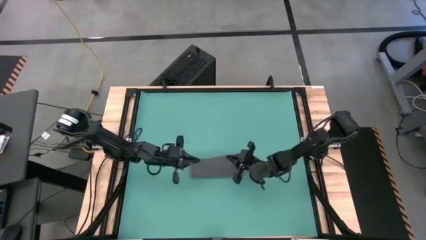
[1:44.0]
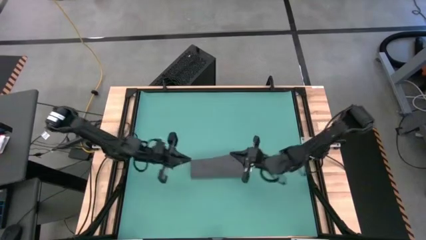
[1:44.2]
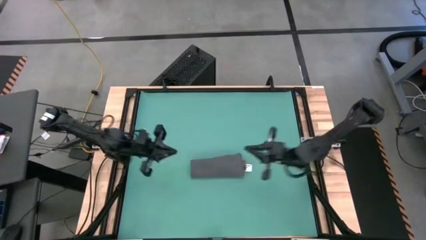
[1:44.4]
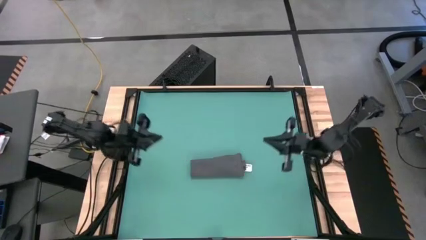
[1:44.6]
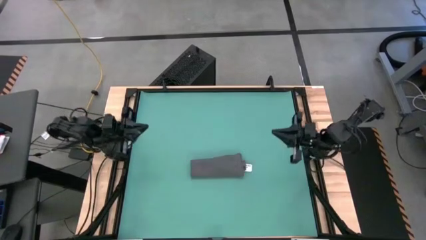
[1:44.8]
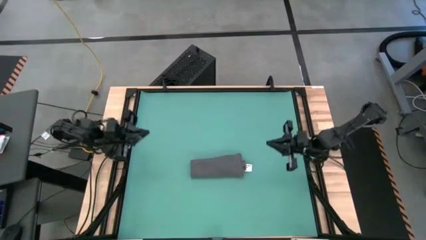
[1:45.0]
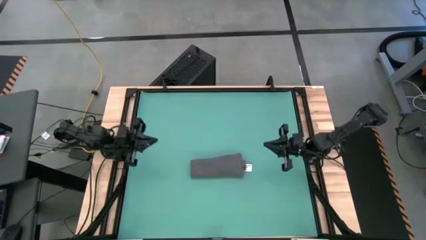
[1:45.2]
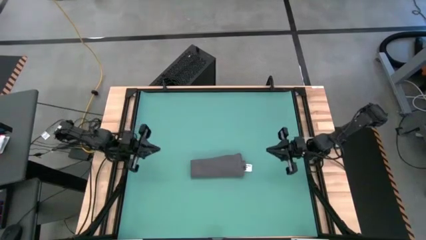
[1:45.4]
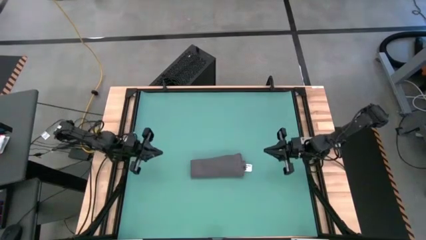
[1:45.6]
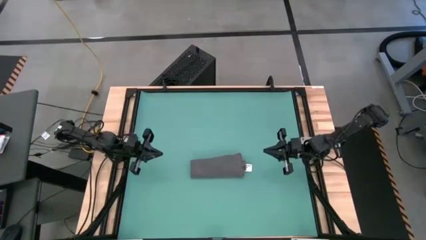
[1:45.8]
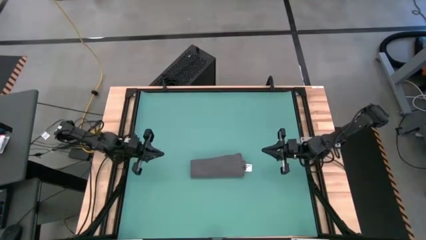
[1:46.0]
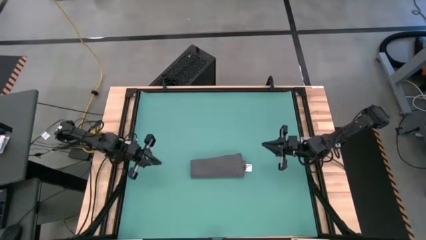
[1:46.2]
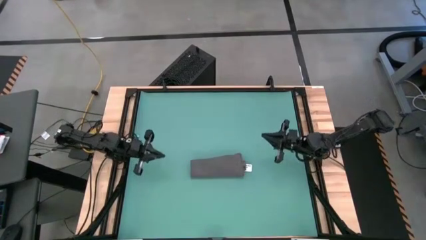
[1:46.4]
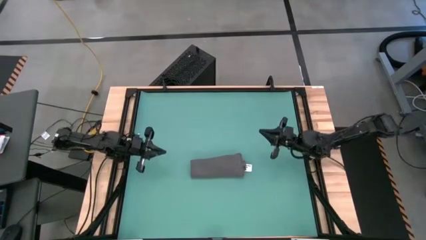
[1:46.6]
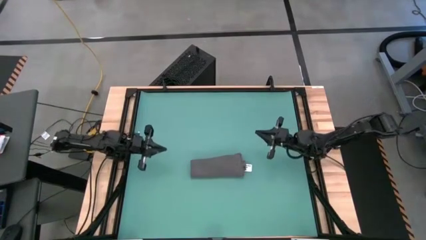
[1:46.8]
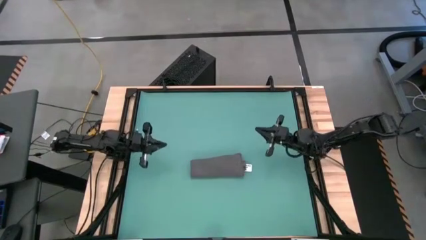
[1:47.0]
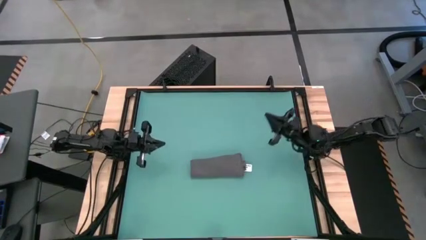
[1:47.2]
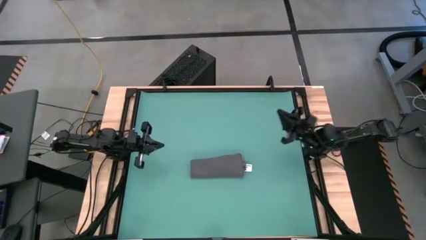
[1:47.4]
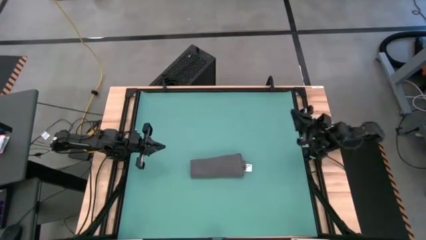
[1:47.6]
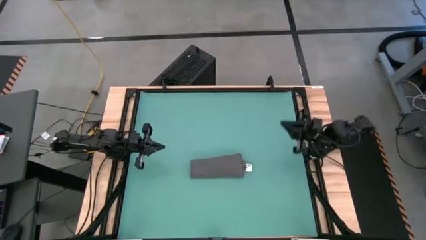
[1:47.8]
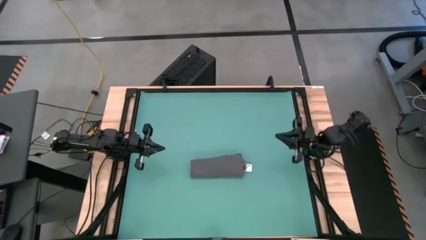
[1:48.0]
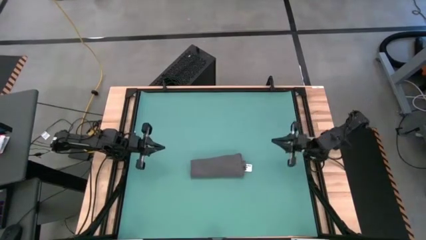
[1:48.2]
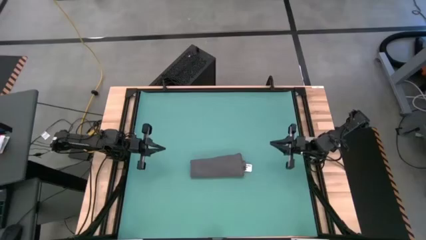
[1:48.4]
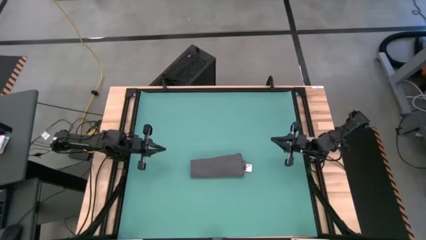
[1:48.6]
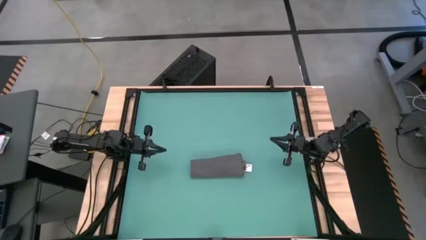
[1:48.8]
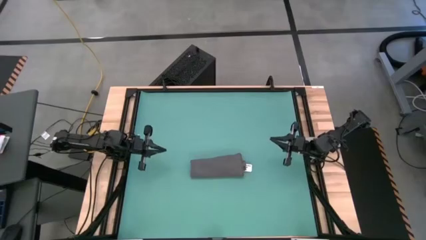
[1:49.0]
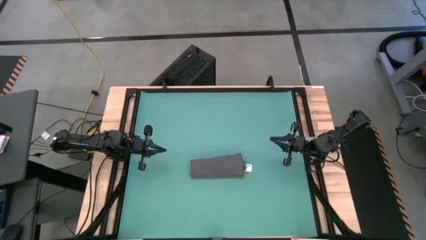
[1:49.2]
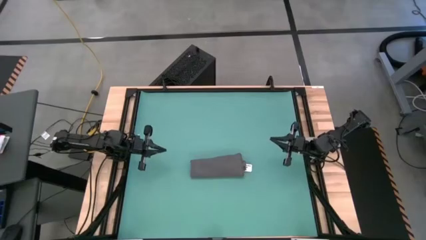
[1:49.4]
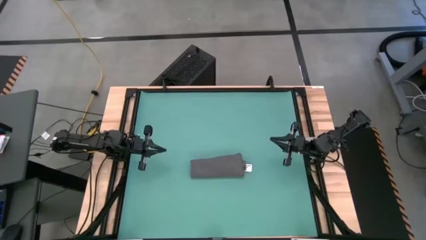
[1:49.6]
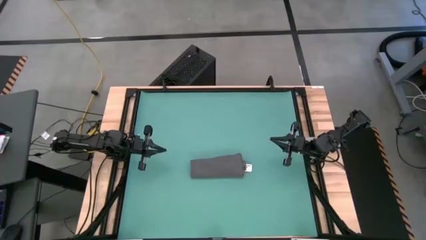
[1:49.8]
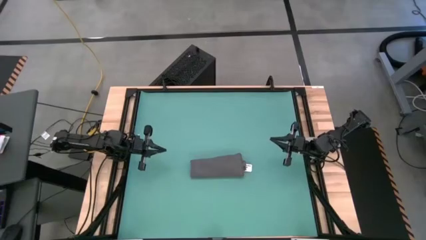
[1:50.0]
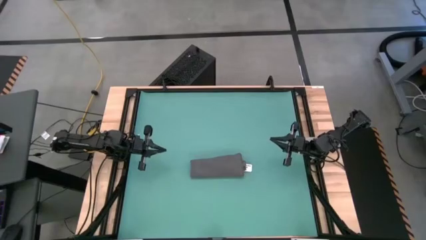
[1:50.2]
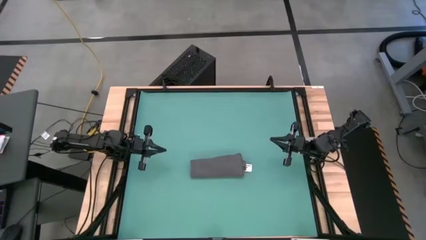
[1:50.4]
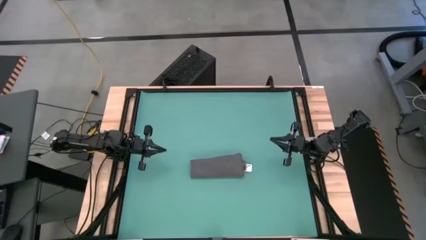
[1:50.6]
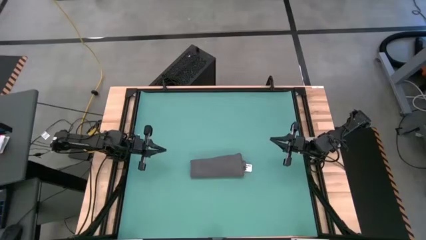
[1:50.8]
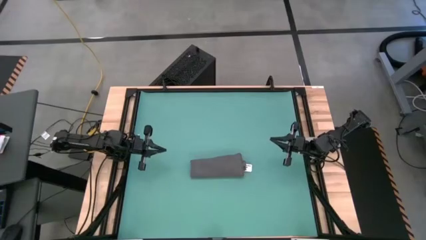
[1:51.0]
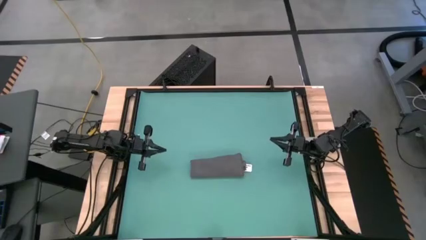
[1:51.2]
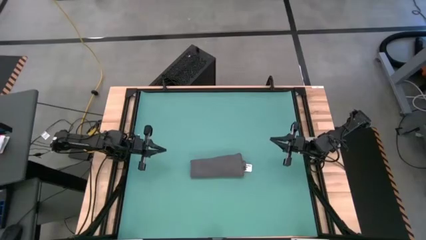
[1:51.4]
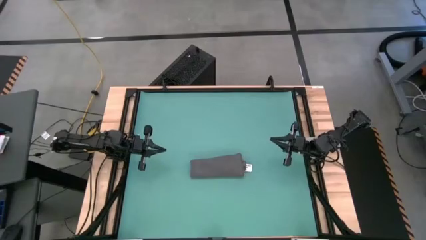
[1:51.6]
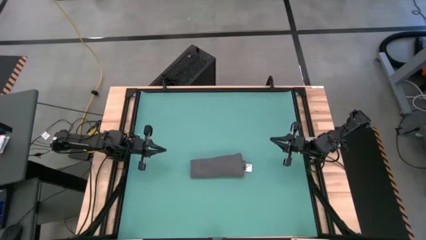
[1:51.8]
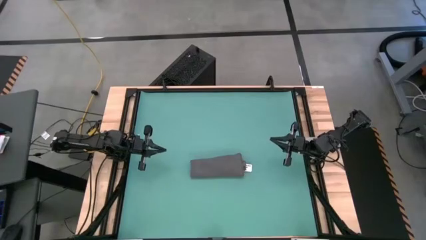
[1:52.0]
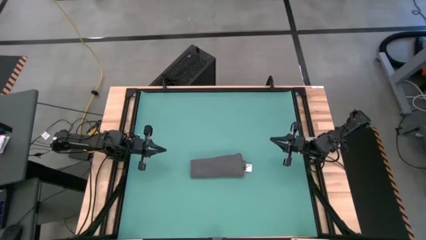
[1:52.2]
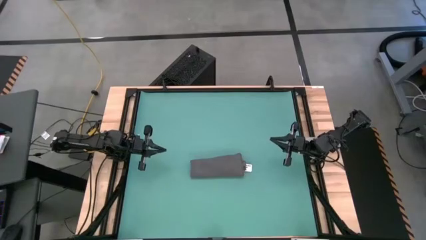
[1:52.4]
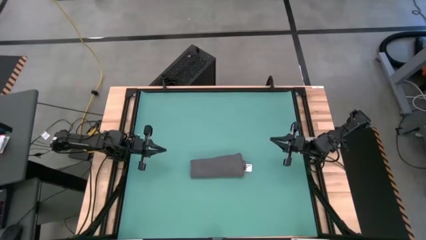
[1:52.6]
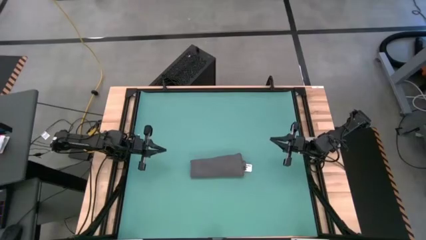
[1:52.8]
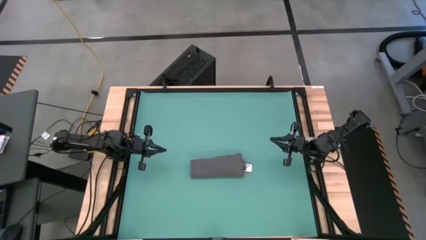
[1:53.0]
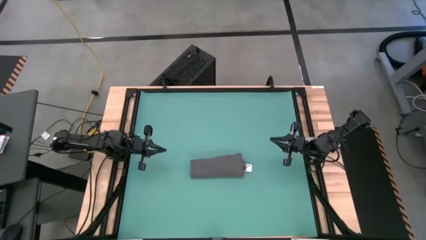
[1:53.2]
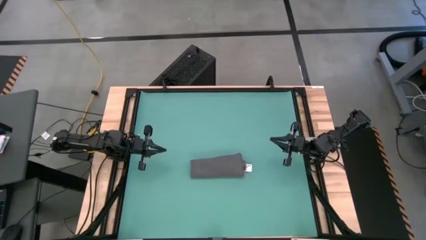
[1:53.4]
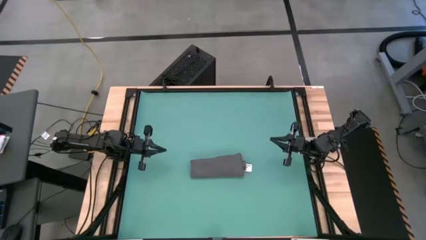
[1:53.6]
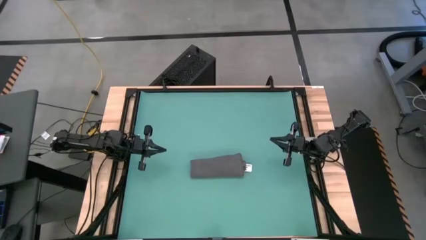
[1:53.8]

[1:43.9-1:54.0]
Task: Roll towel into tight, uniform cylinder
Return to Home Position

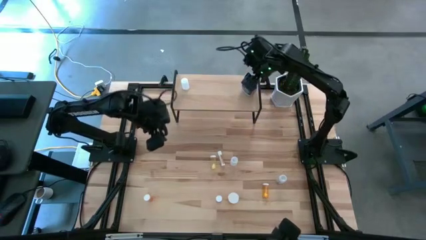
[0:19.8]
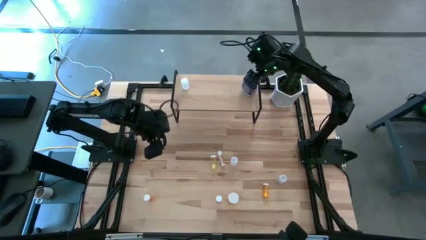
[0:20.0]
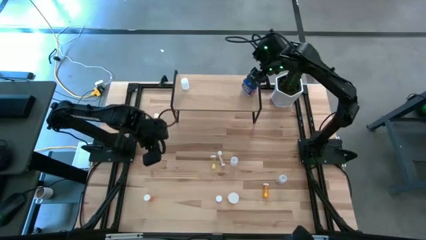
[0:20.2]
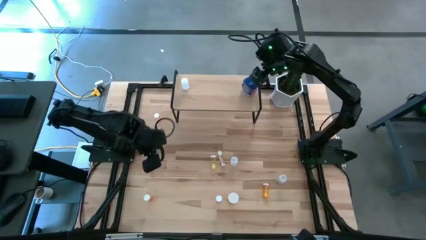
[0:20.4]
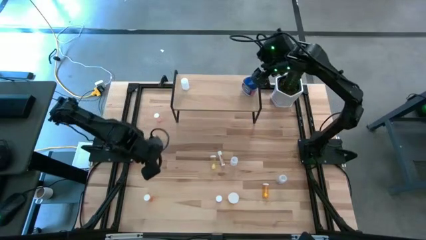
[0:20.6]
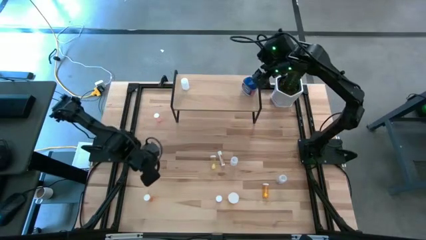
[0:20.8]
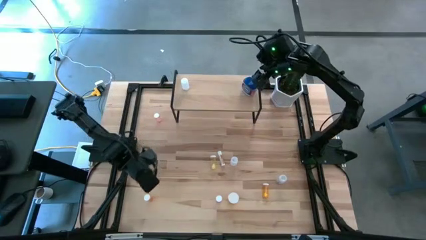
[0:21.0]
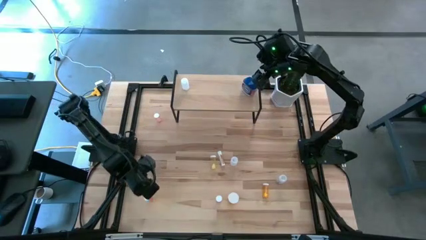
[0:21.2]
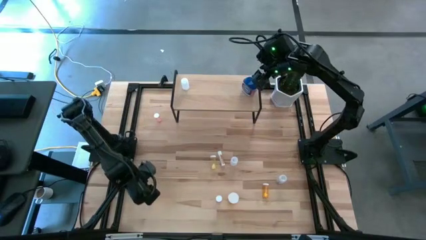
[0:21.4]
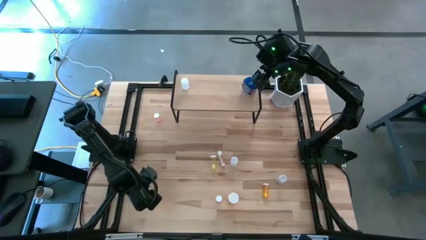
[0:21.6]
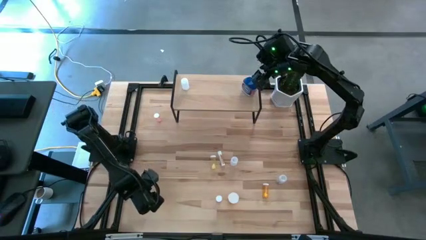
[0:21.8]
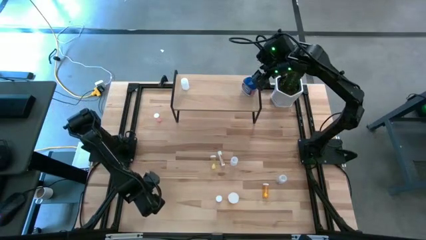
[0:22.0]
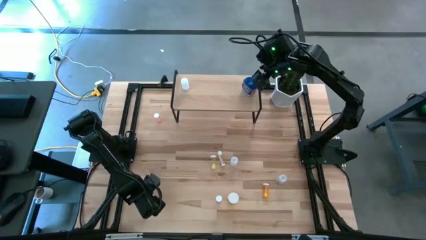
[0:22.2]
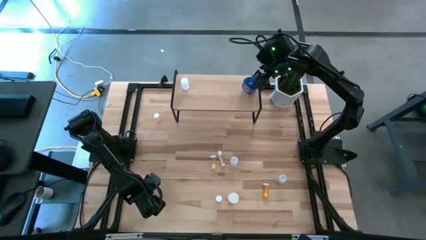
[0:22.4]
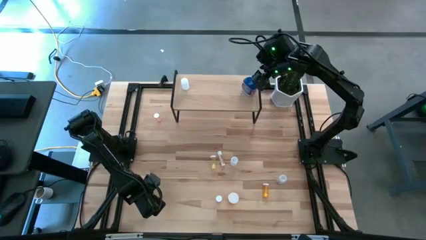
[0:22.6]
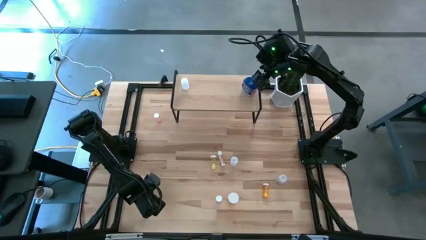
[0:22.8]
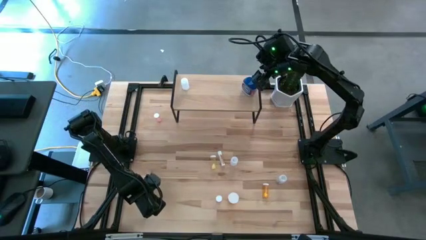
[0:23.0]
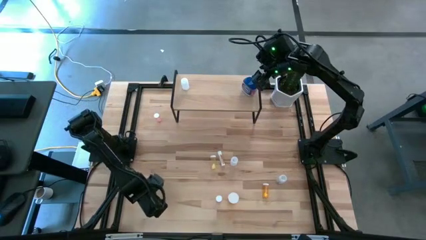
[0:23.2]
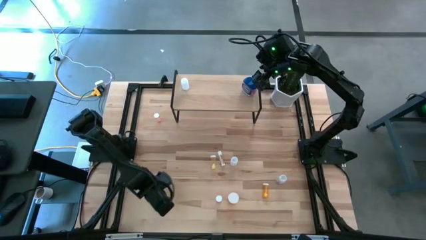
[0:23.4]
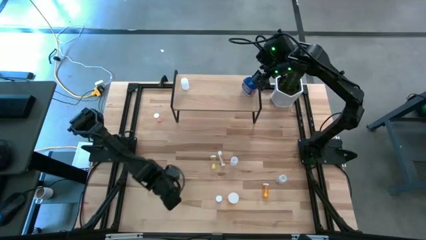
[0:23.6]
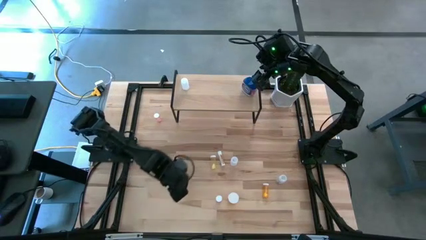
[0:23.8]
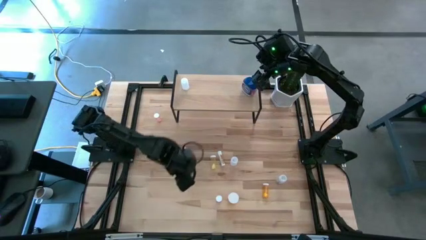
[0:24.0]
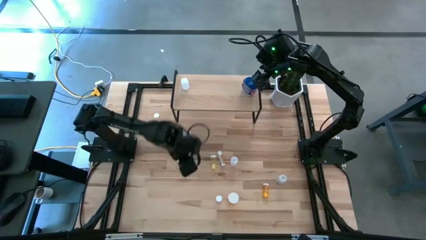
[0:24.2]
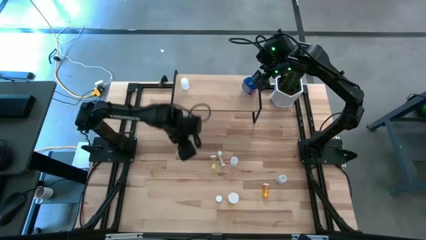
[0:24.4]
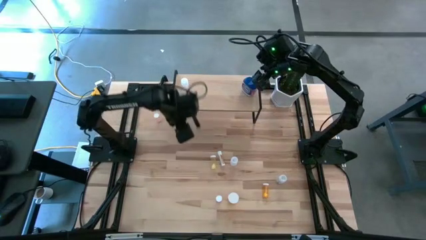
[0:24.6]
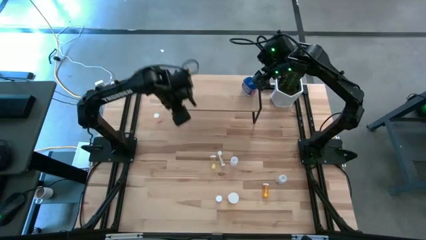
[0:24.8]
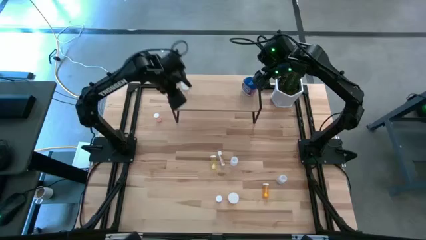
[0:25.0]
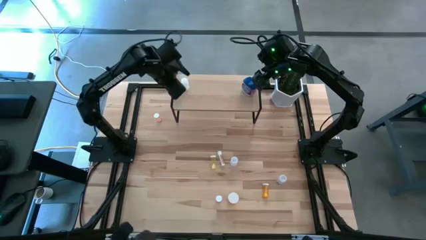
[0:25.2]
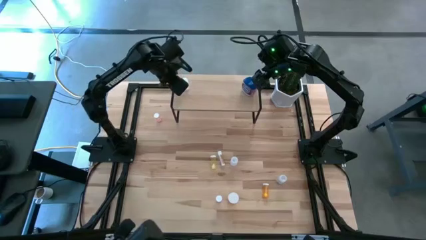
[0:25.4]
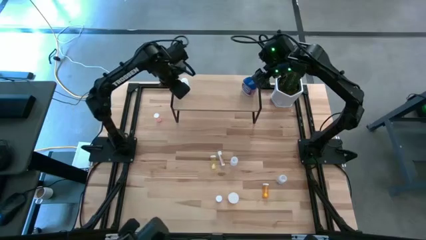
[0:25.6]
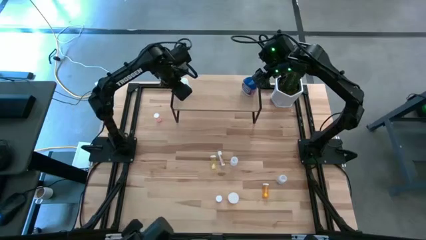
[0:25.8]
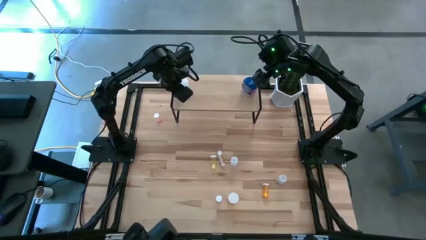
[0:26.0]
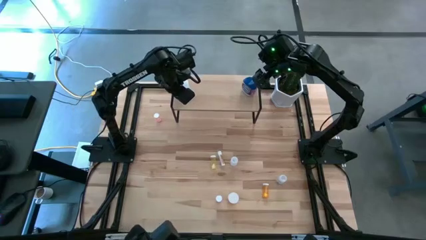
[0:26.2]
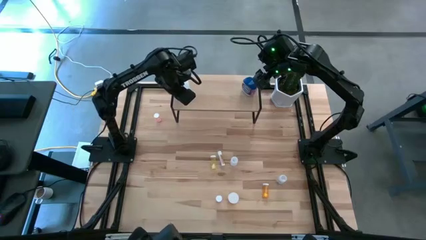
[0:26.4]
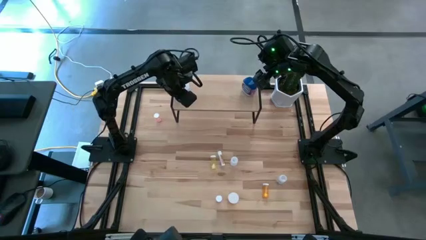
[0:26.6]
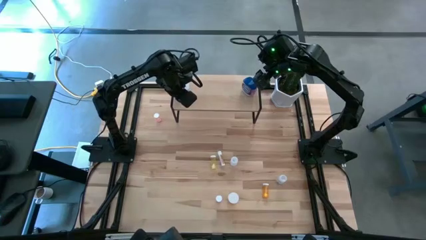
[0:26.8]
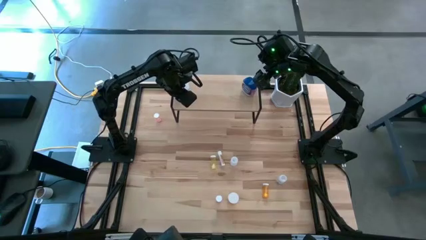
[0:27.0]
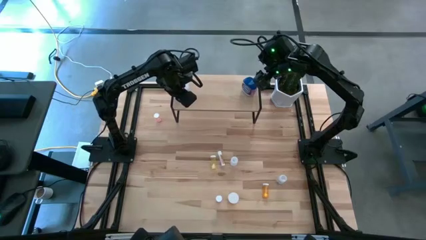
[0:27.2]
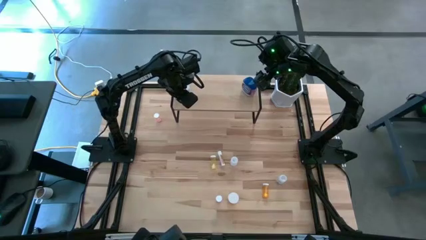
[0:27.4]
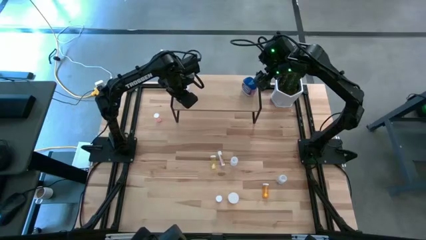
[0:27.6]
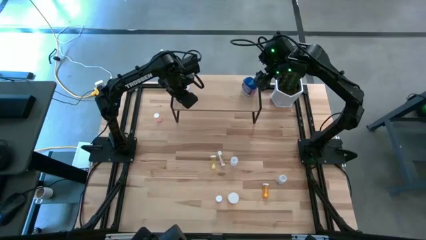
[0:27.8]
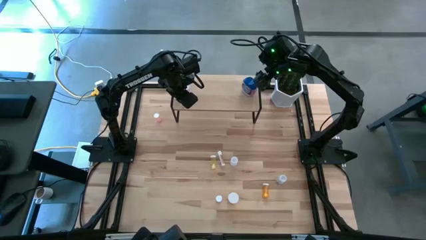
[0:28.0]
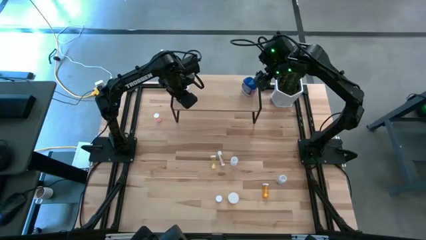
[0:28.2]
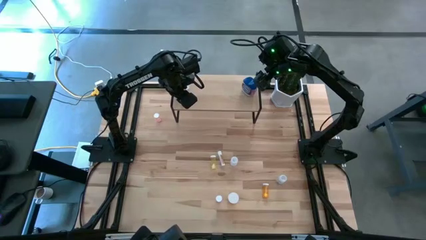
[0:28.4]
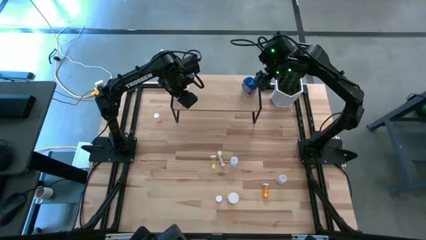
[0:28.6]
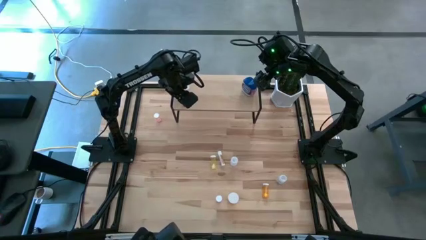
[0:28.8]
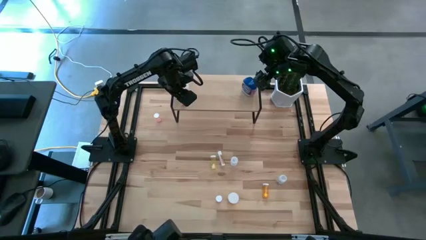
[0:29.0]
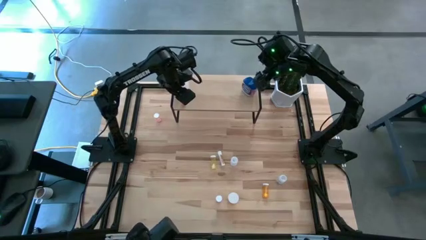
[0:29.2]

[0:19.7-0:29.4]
Task: Pick and place medicine bottles onto shelf by color
Put the left orange pill bottle on the shelf
